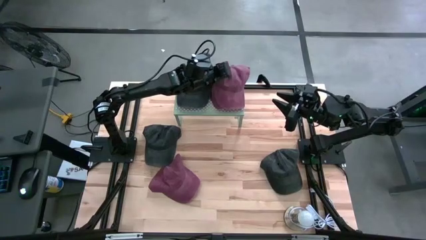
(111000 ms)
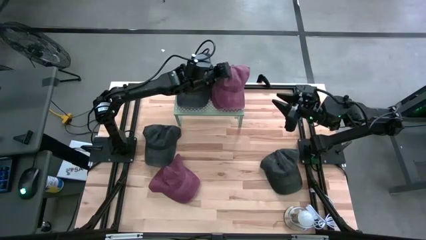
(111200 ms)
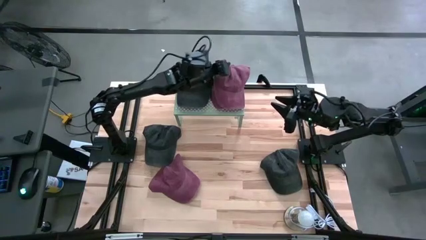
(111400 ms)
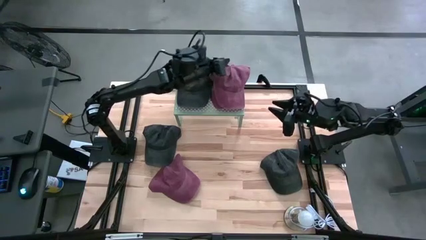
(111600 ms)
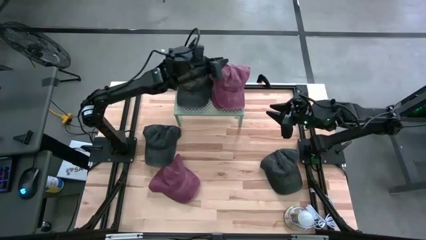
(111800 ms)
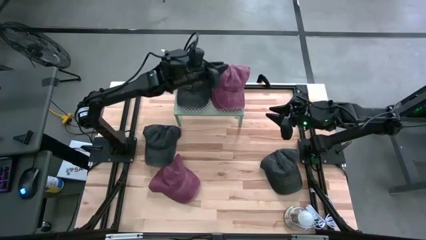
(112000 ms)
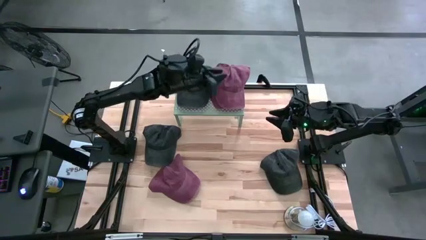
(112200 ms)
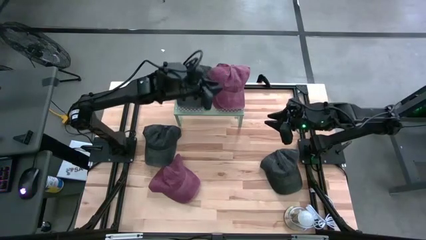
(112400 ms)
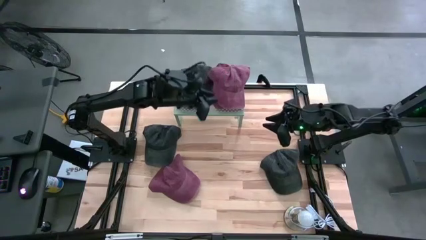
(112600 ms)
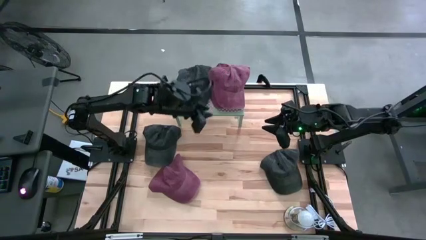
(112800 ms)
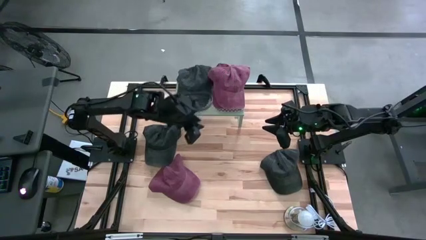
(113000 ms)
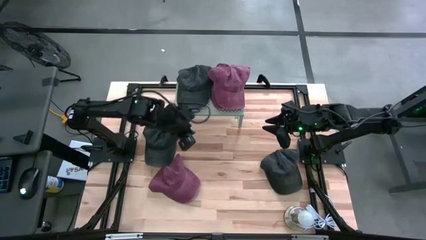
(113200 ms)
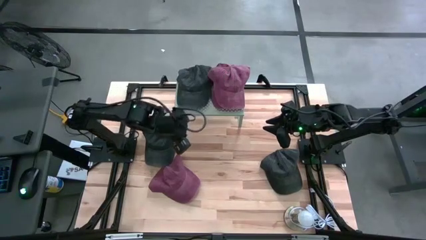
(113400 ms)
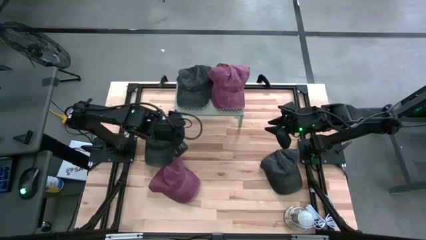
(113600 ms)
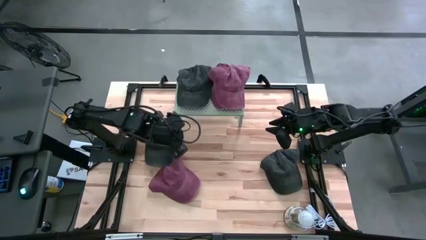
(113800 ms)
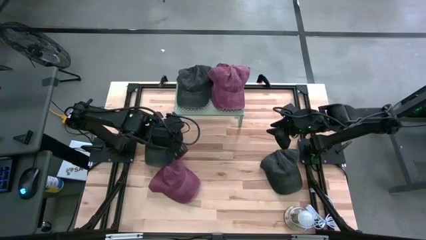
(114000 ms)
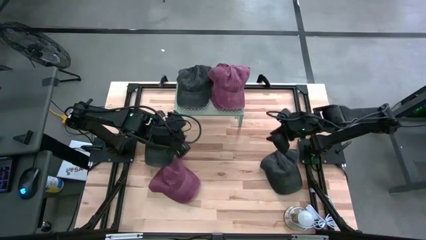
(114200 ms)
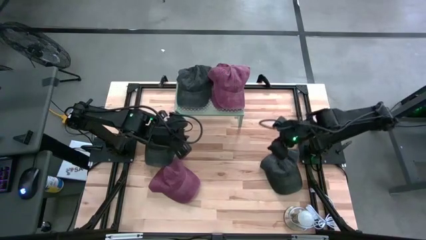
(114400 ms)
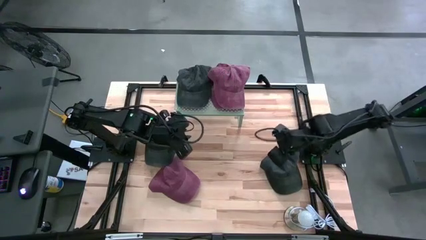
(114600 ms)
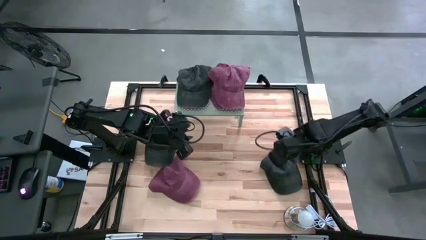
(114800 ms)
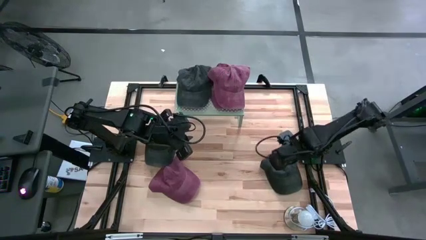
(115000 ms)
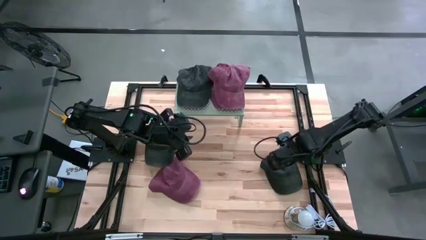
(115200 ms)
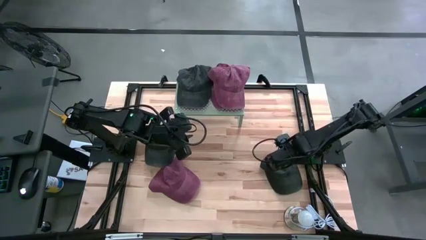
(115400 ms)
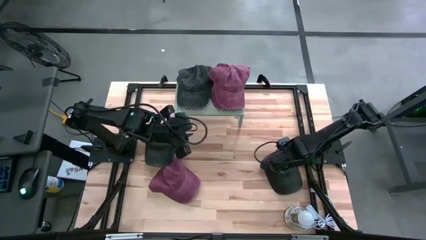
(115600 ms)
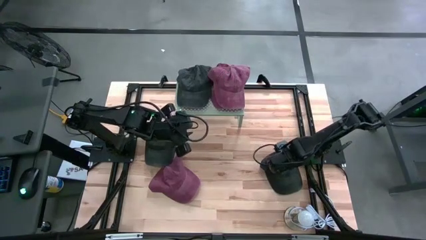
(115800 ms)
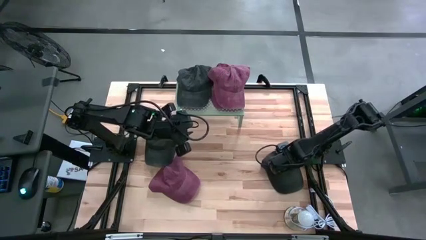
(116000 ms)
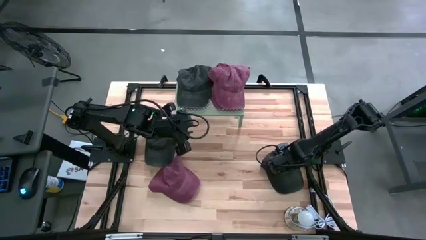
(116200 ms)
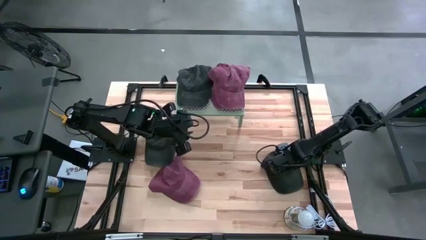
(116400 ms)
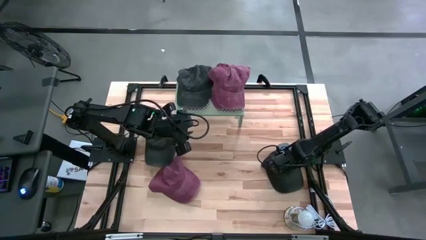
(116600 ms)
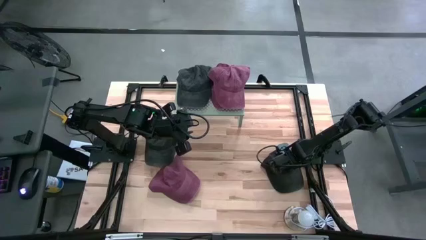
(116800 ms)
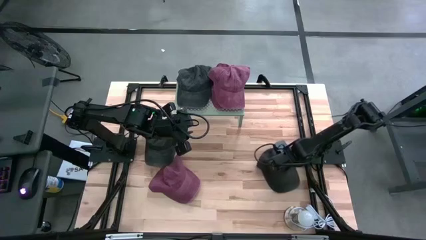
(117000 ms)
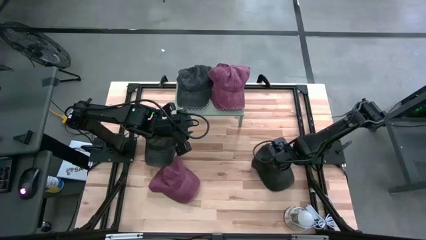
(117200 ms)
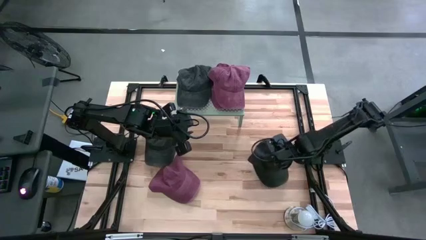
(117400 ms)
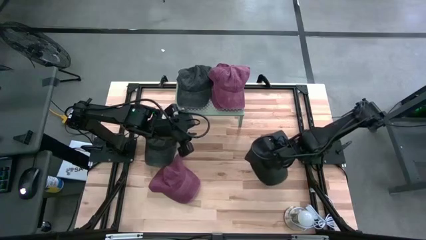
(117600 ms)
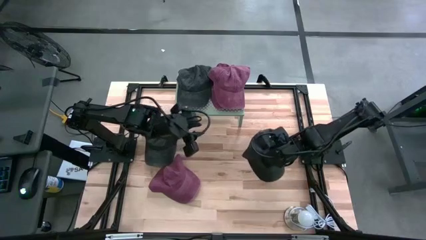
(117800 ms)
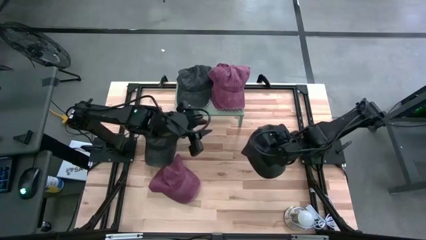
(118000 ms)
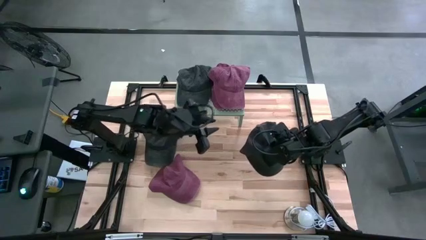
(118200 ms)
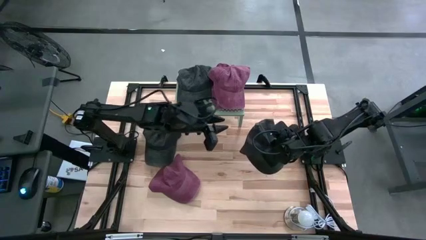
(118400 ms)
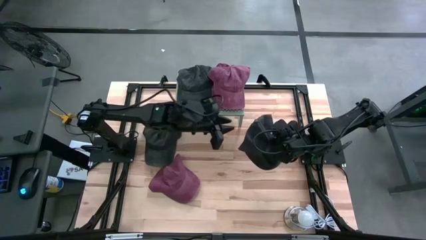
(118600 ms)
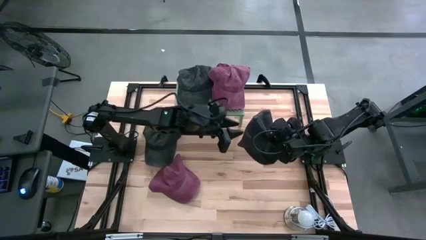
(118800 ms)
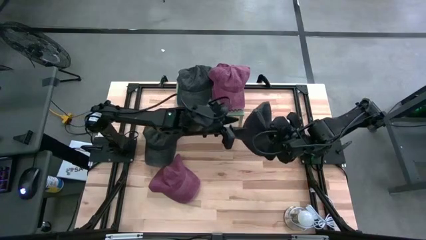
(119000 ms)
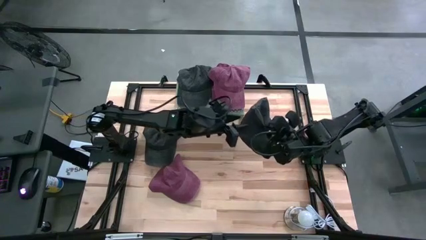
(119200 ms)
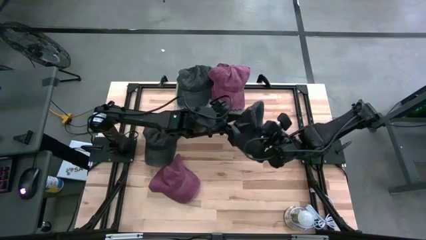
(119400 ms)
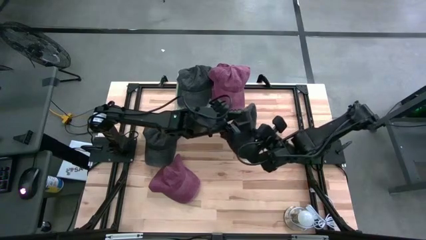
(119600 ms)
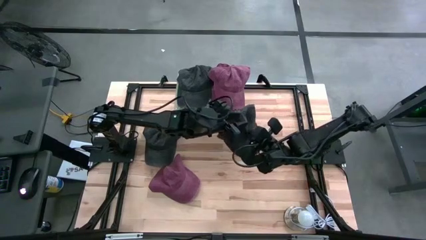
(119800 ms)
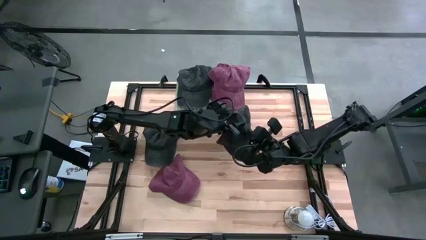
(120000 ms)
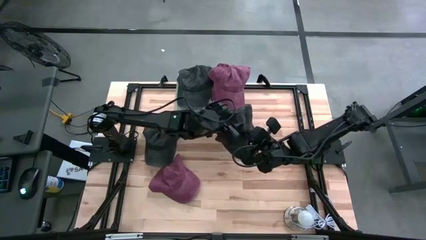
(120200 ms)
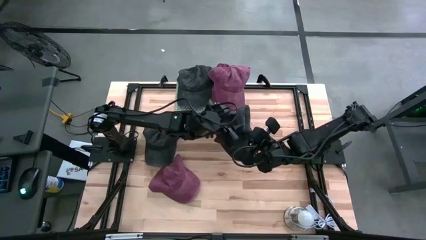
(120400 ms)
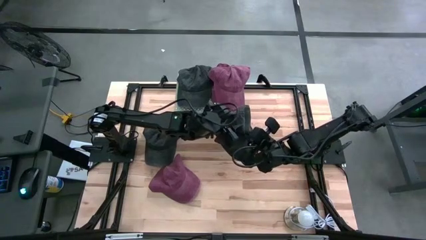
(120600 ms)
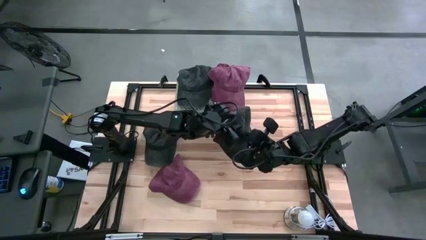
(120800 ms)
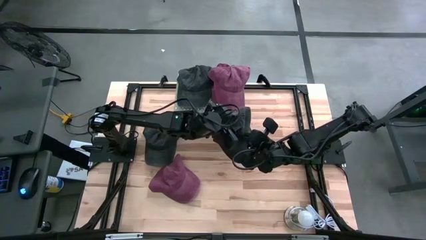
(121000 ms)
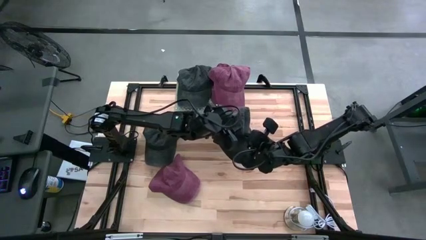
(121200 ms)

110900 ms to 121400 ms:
Task: Pick & Place hat
Stack the right black cap on top of the black cap on the shelf

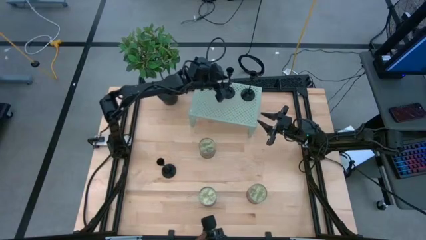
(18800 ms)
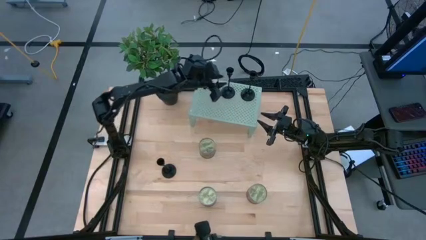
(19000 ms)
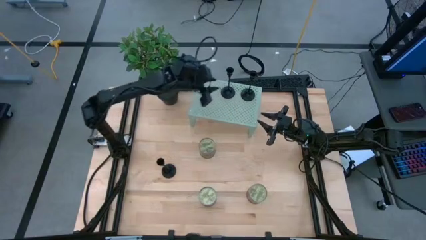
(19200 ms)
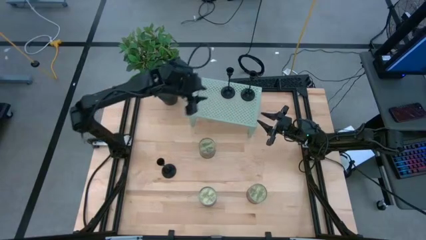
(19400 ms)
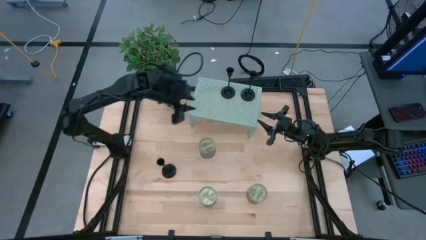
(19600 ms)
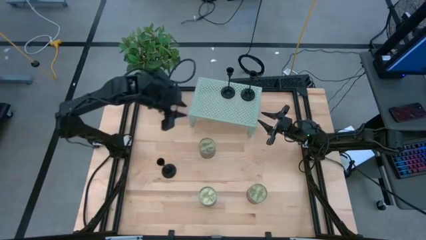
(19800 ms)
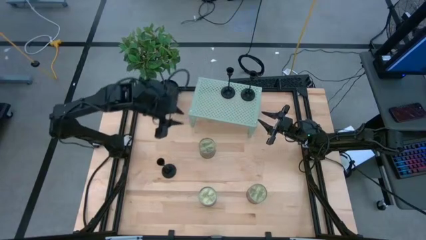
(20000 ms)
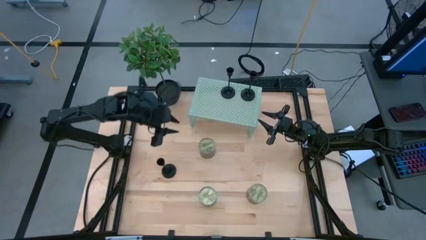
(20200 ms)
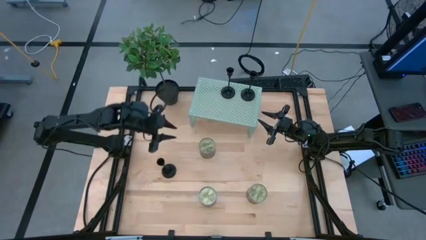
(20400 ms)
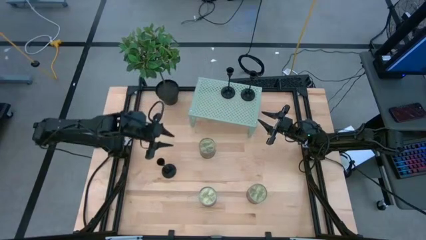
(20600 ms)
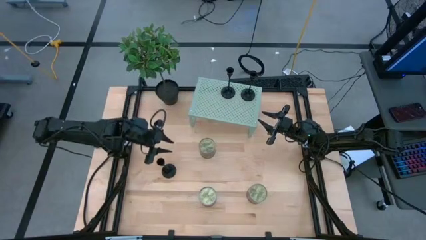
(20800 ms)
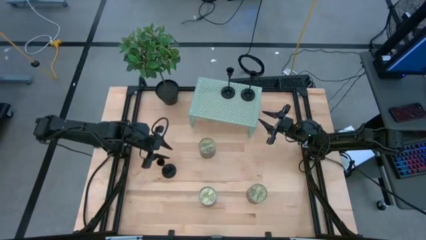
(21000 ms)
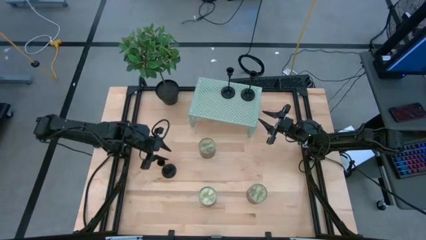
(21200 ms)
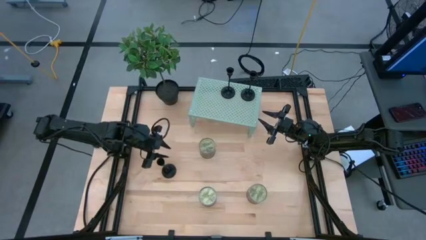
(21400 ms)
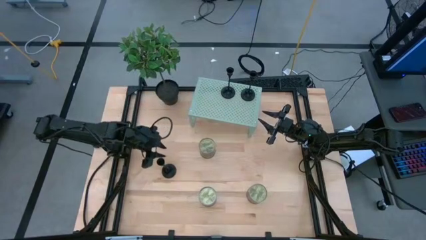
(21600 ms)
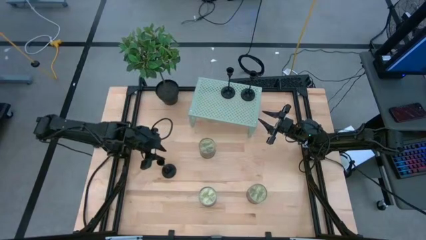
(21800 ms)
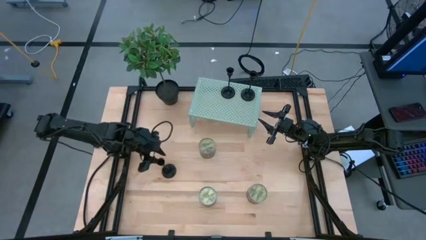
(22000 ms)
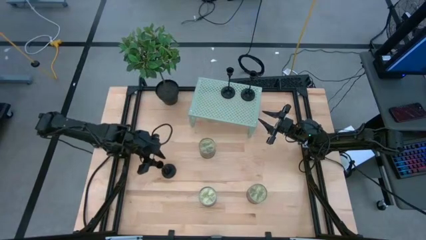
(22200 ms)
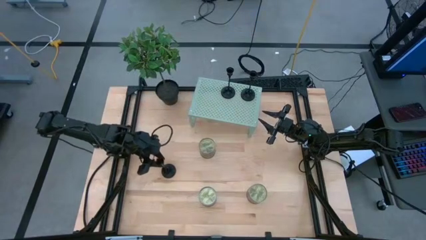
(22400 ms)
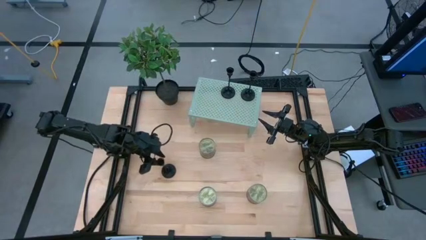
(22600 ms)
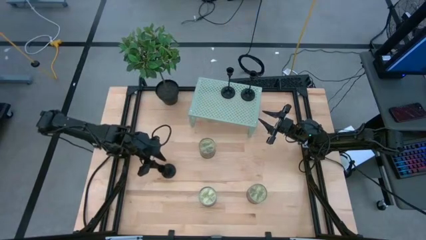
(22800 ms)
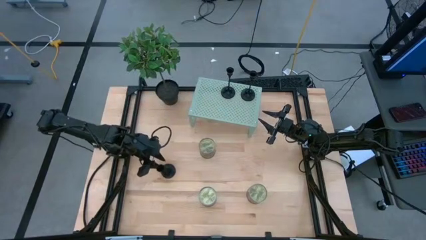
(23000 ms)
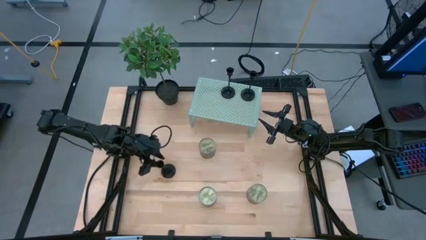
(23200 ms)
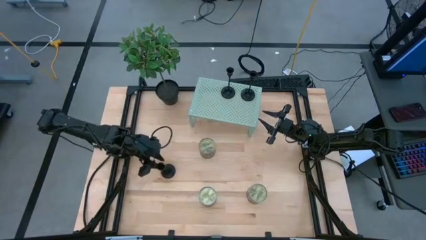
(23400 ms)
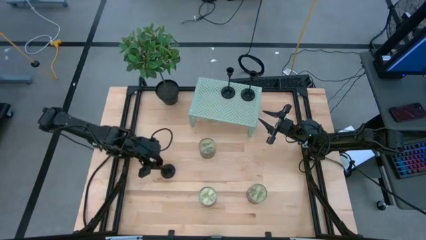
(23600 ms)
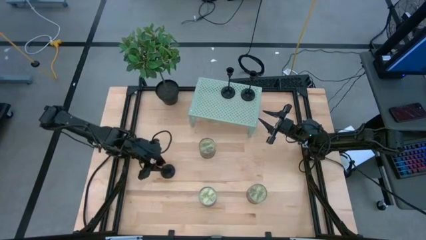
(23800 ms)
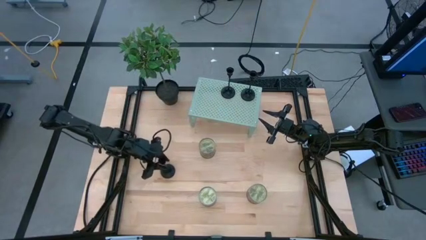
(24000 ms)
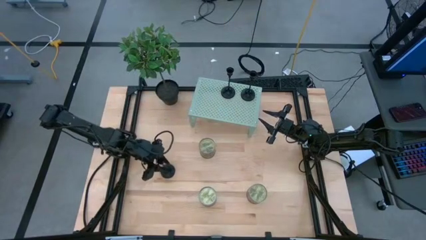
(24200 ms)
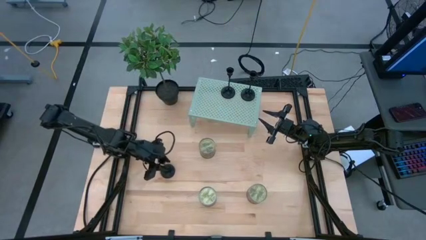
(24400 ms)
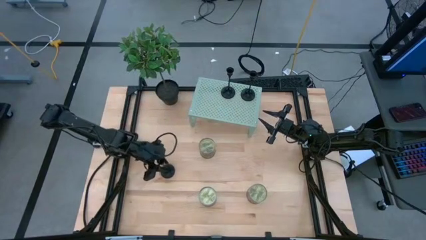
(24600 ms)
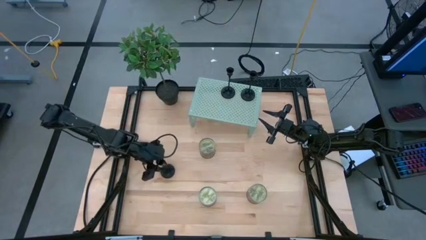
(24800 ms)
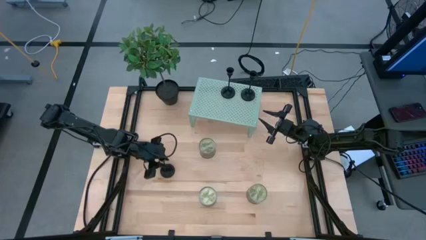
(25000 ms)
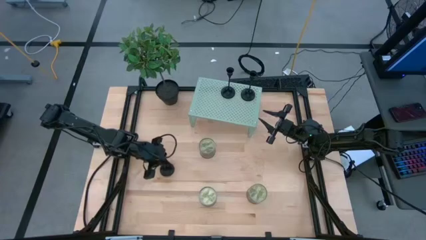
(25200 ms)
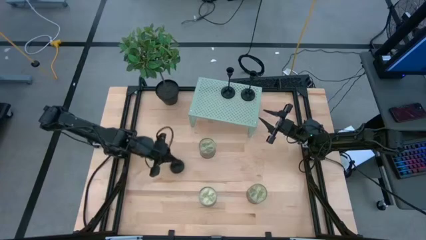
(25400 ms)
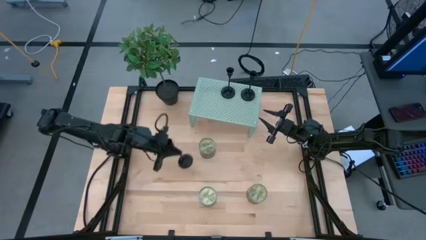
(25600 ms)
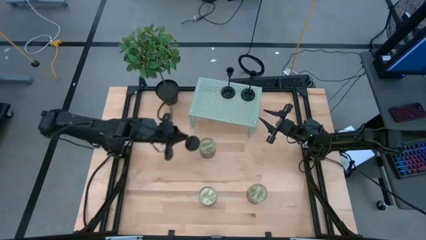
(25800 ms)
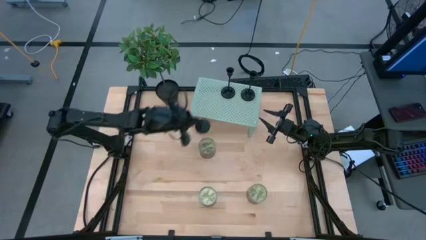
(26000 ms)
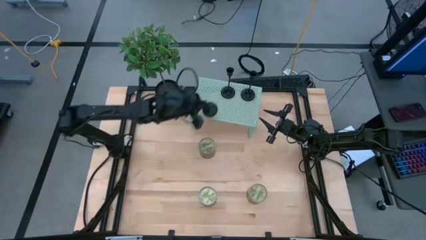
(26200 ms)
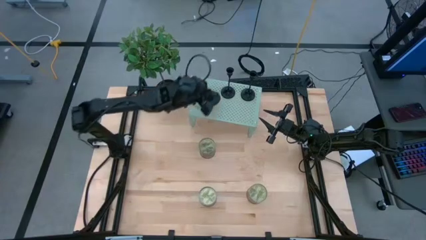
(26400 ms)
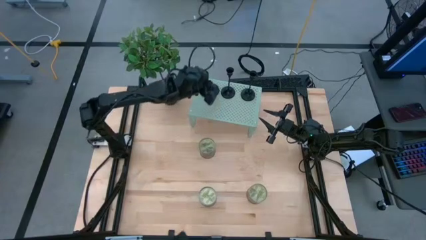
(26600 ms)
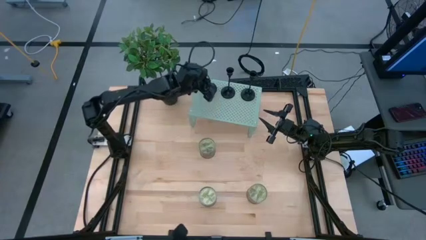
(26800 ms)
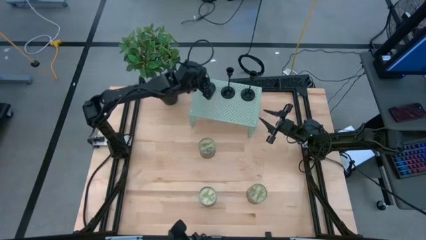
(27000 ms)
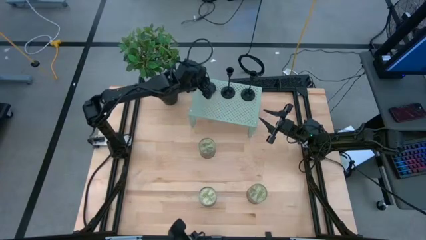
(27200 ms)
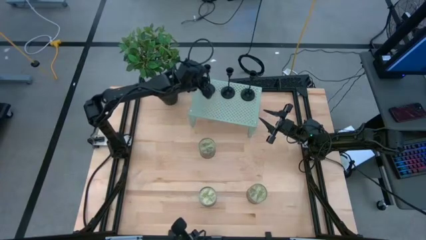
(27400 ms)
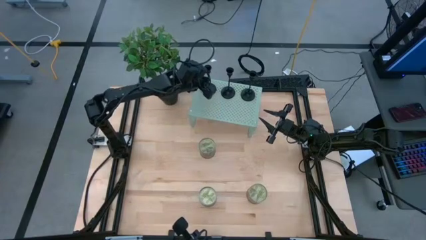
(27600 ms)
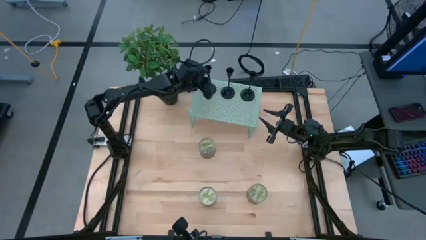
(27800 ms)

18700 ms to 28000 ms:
Task: Pick & Place candle stick holders
Put the black candle holder on the shelf
